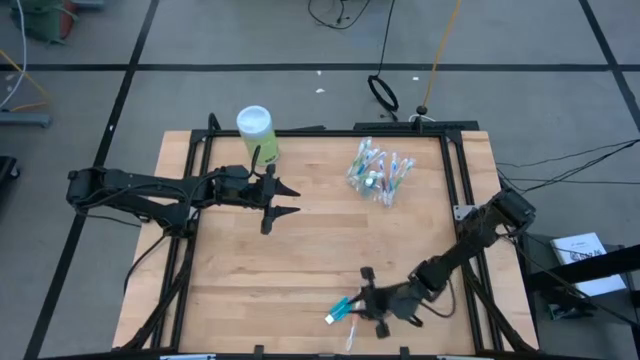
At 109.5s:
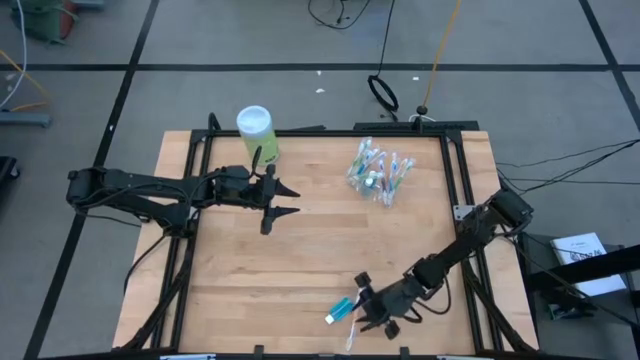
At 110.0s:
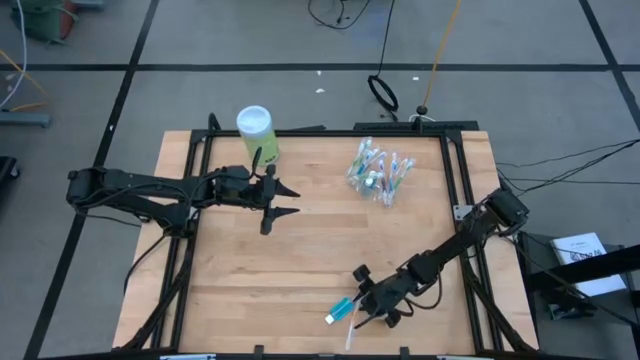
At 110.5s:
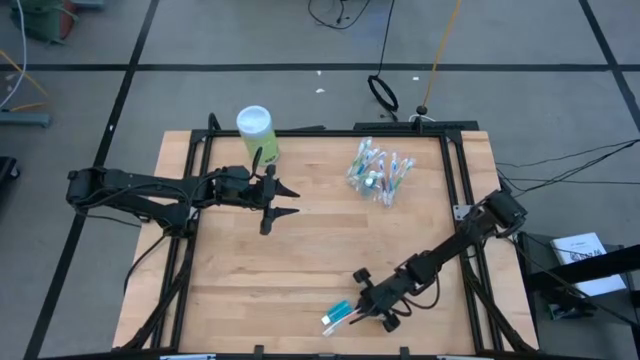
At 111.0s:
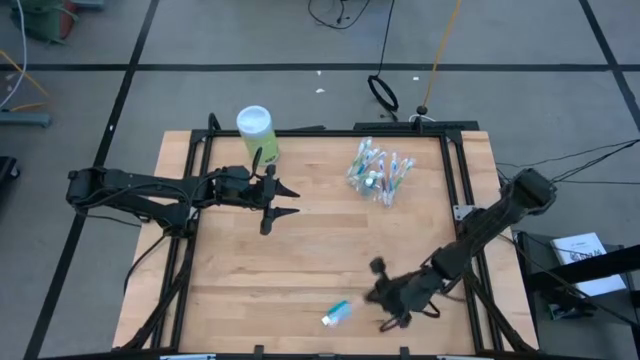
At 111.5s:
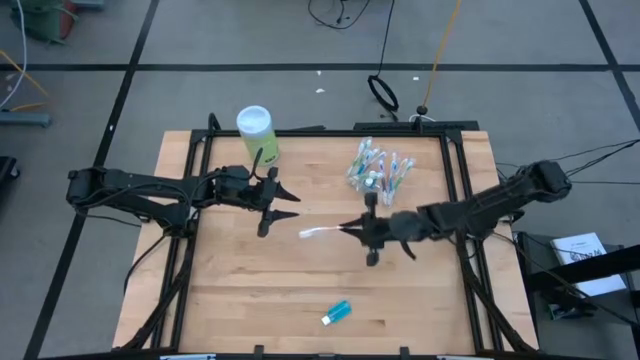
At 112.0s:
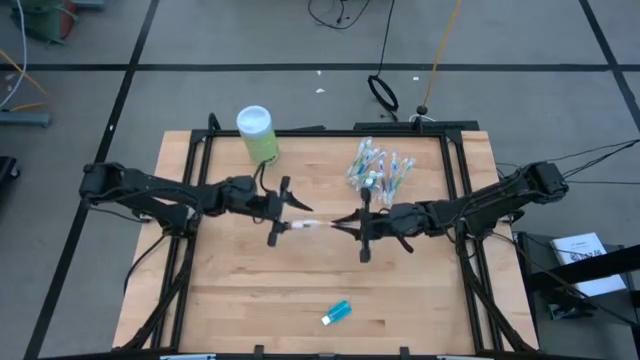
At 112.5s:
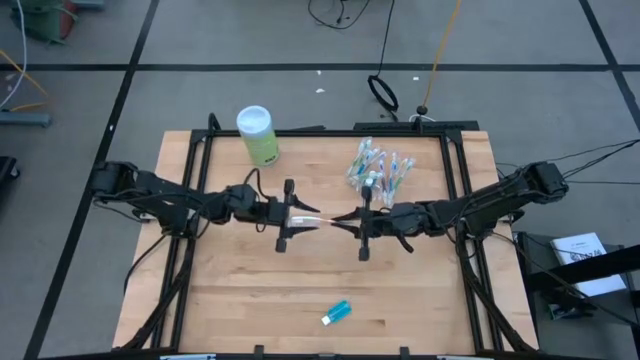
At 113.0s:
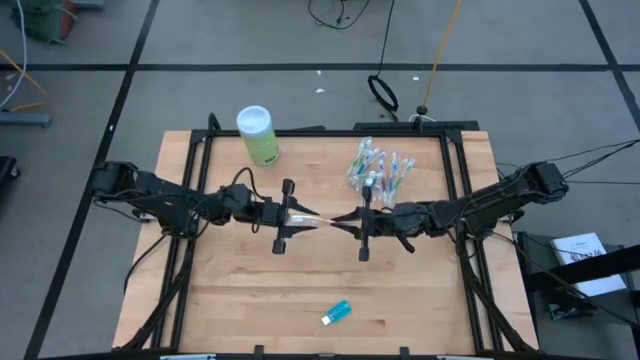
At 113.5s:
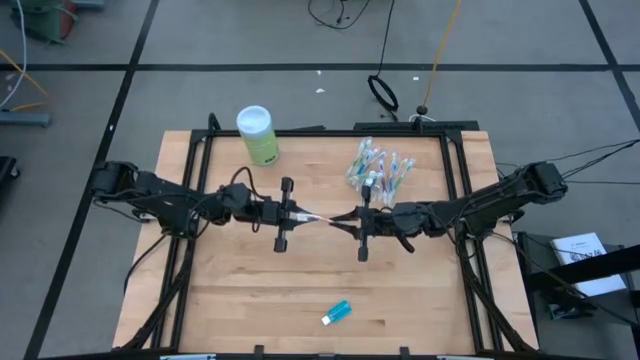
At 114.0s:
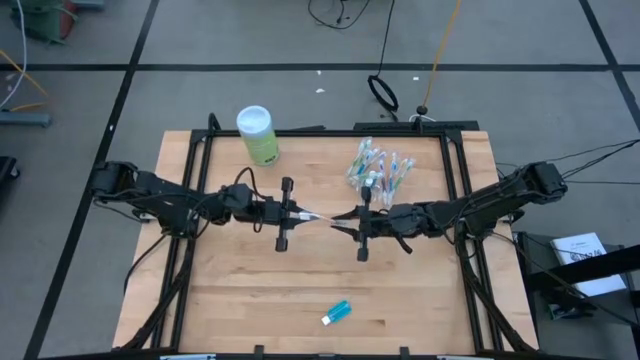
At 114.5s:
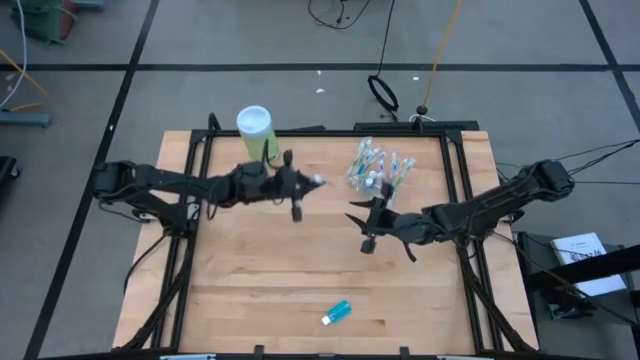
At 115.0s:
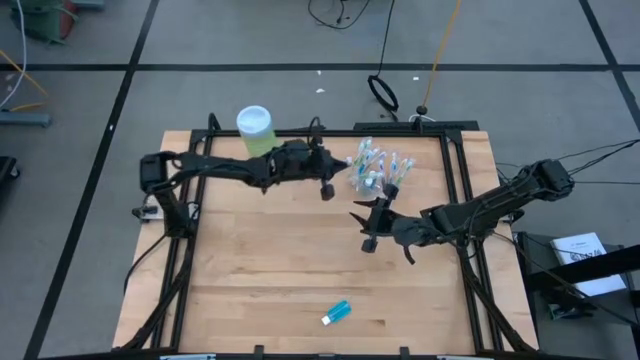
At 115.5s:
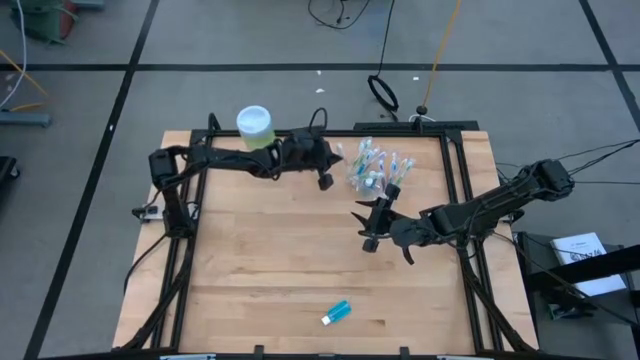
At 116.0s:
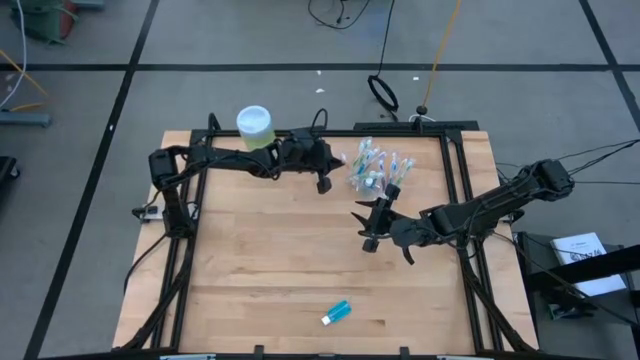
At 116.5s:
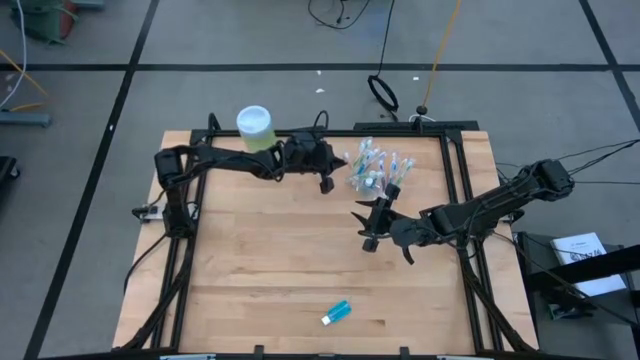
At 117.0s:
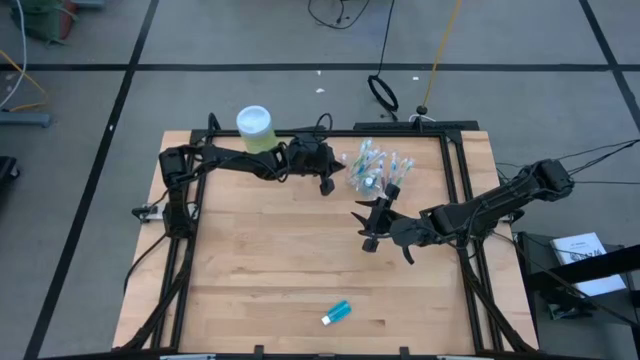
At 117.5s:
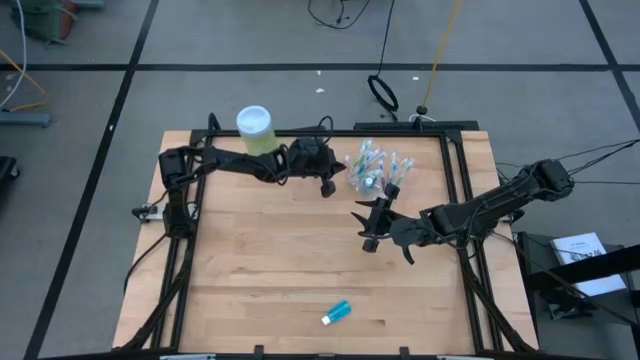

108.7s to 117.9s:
Task: Pick & Place toothbrushing station
Put the orange toothbrush into the transparent organizer

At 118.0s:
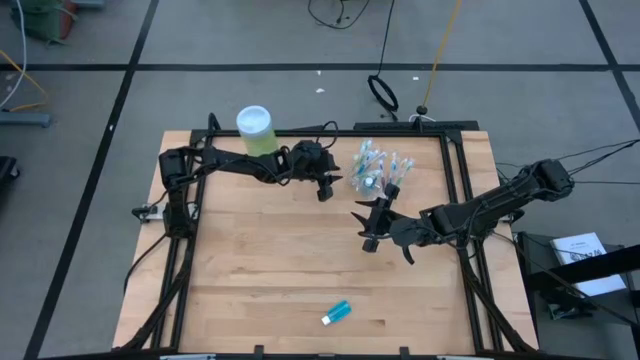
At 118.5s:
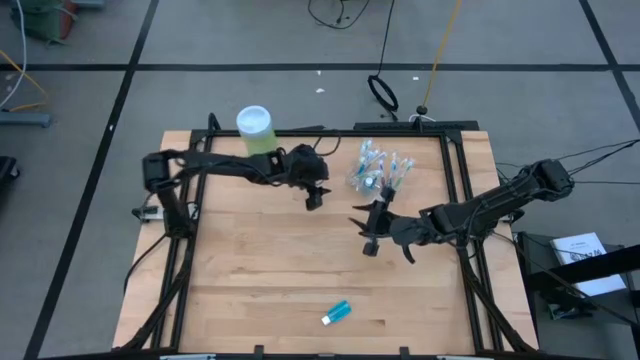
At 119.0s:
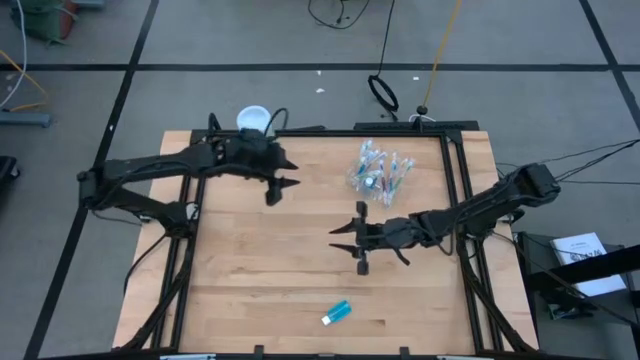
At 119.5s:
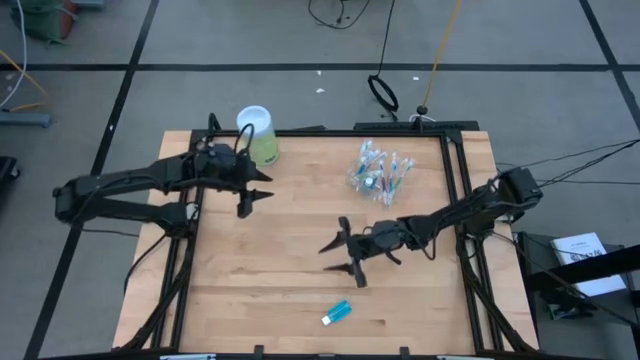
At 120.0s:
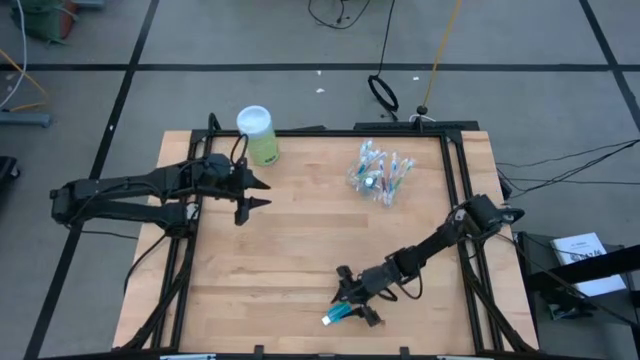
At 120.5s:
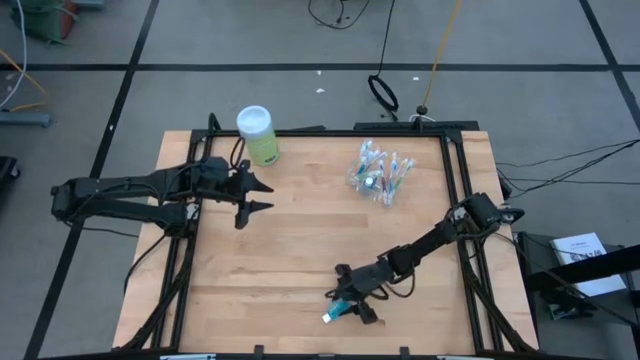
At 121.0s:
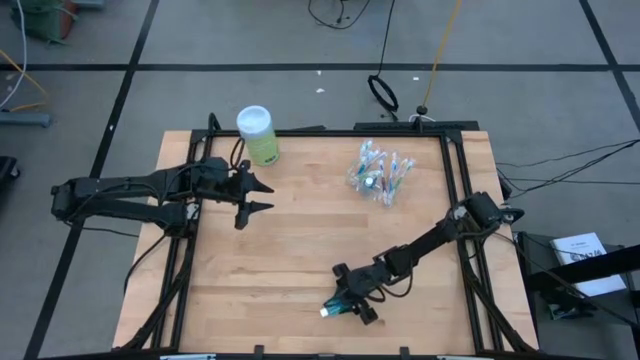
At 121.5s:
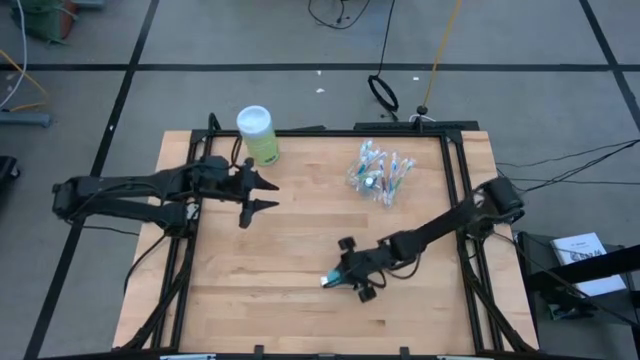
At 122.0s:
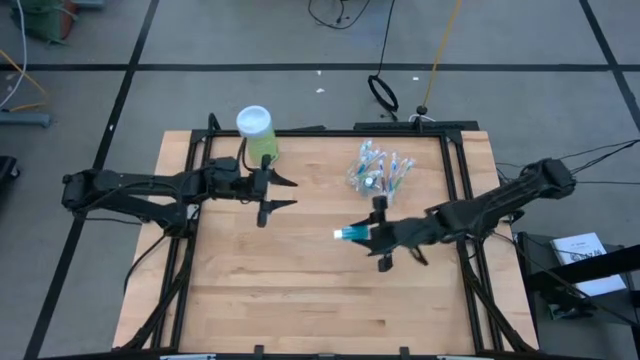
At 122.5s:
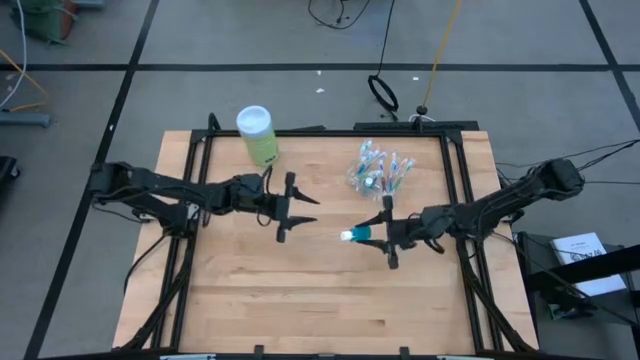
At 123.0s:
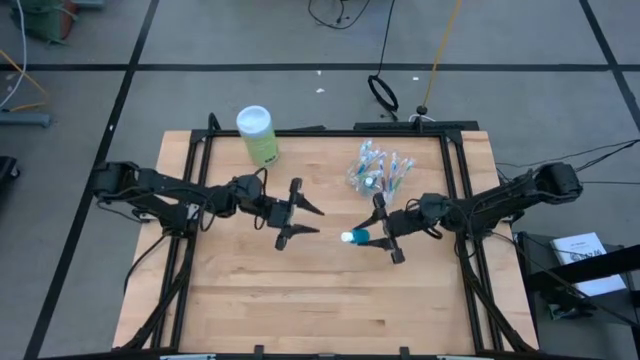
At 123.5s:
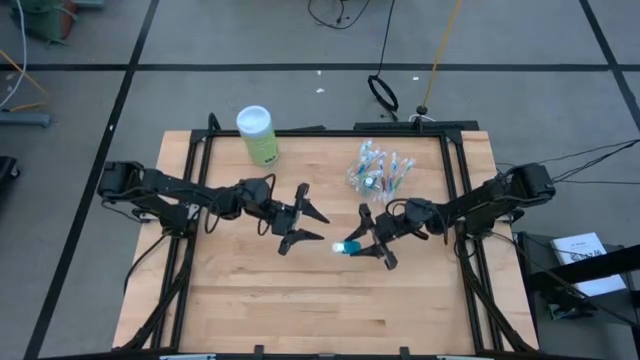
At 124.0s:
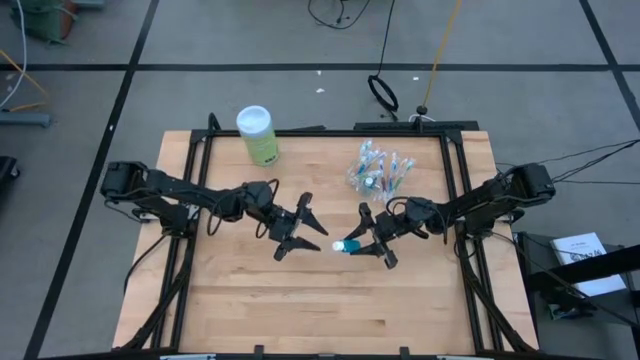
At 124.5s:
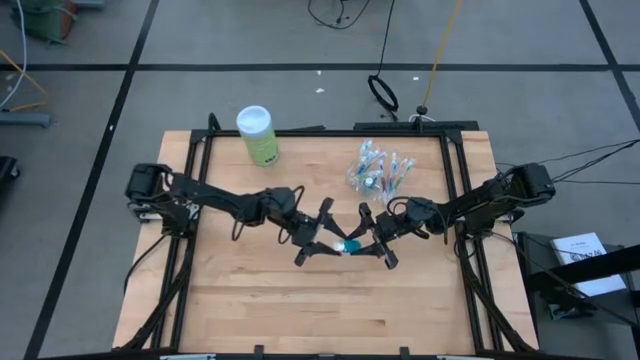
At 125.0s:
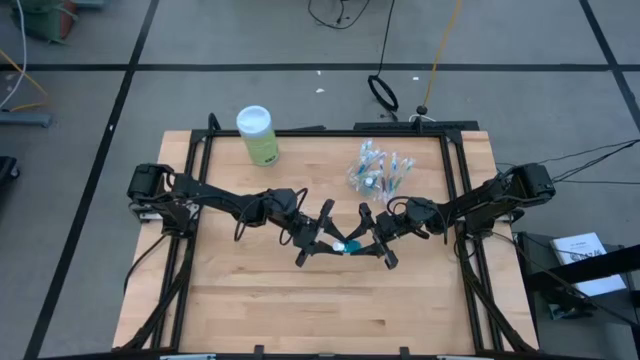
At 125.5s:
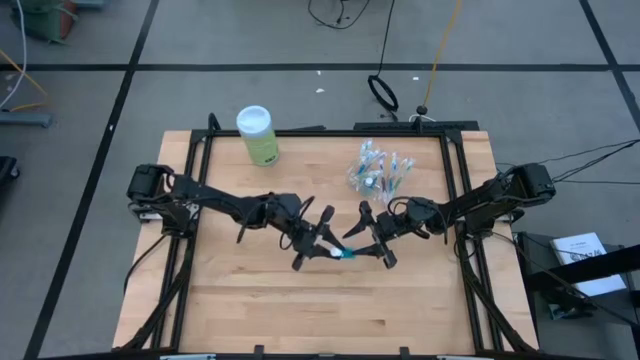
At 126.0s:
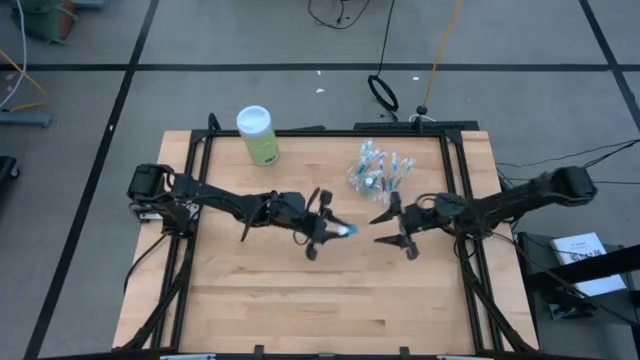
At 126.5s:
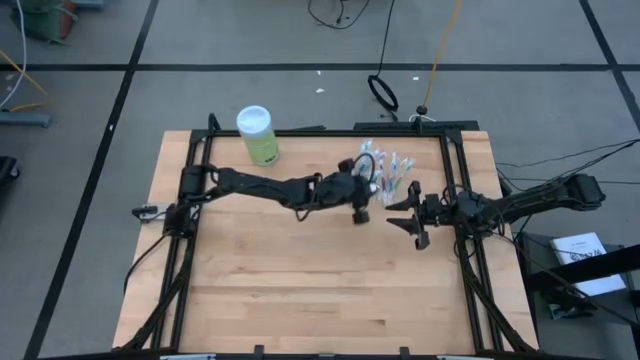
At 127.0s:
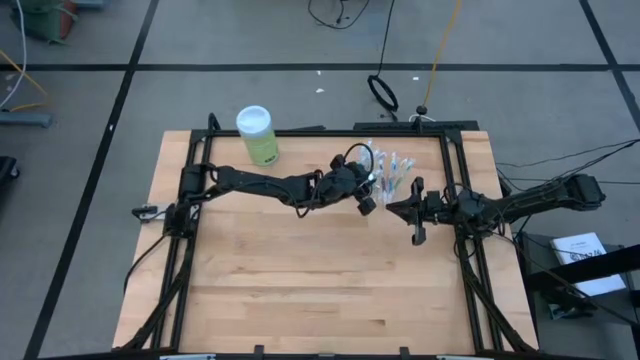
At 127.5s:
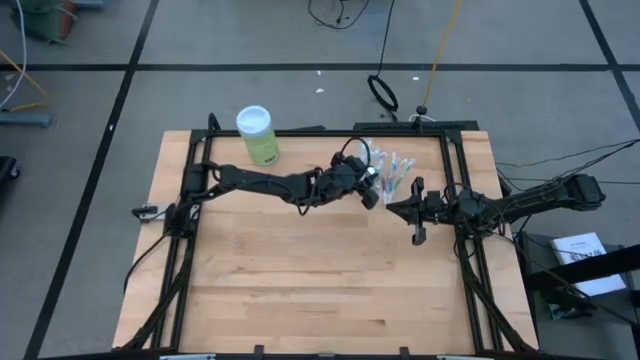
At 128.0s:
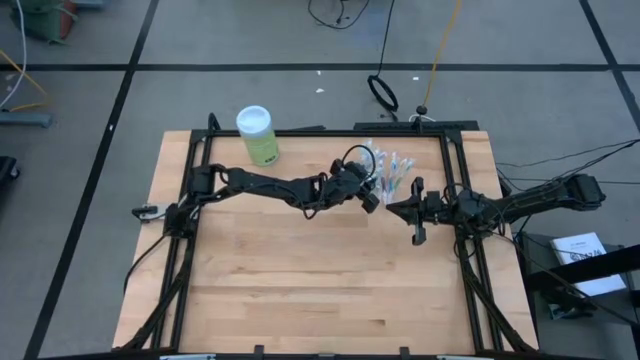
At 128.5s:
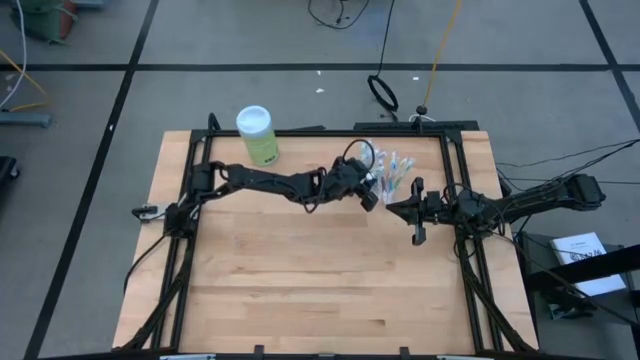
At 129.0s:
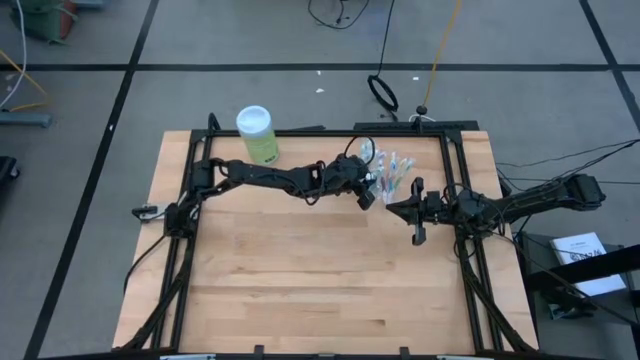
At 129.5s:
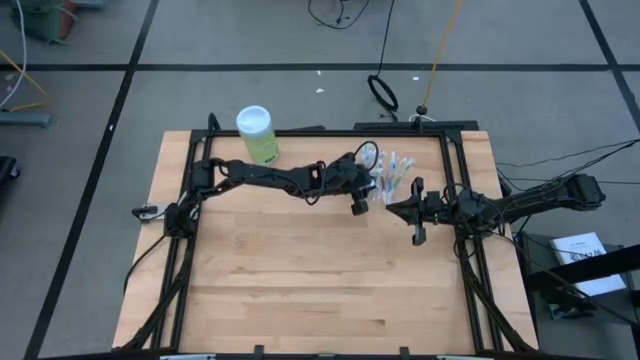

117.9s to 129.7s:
Put the blue mouthwash into the transparent organizer

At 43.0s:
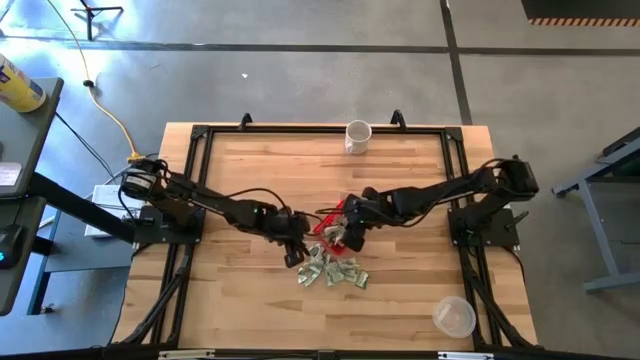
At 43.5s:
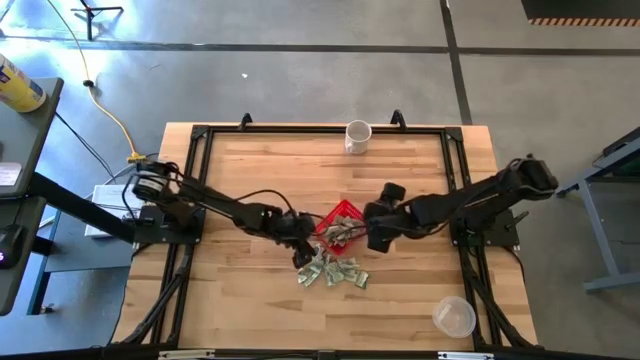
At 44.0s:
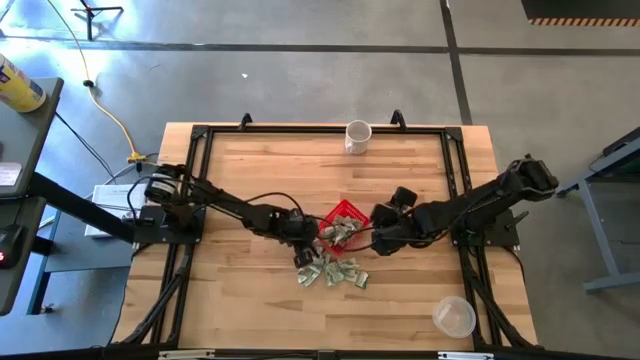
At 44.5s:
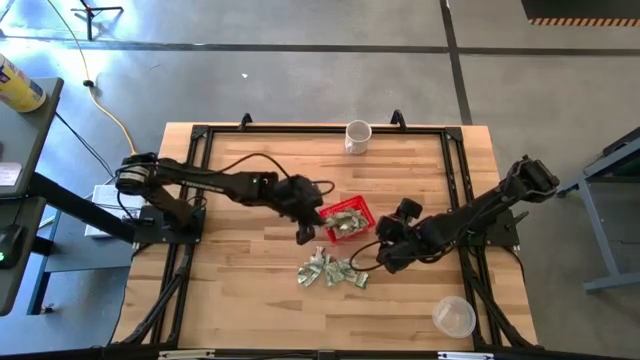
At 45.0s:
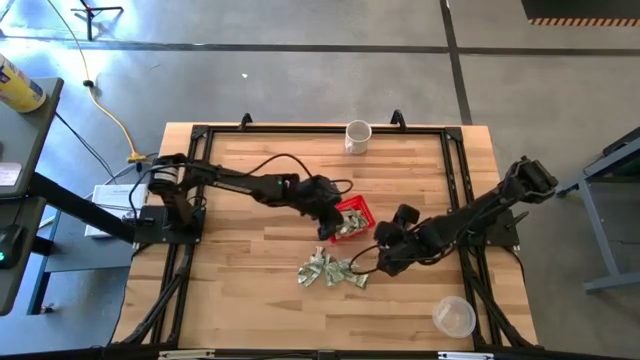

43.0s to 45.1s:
Task: Pick and place items into bin
Put the white stevia packet into the red bin
